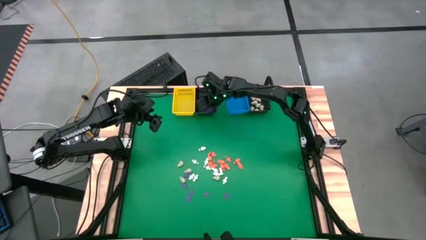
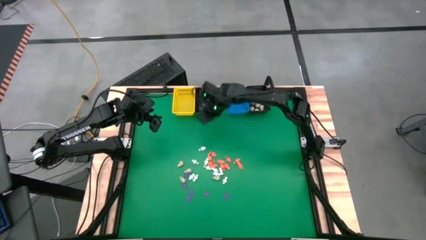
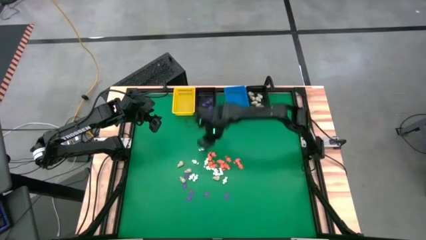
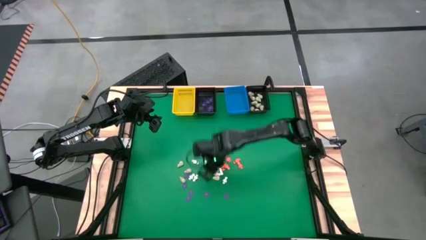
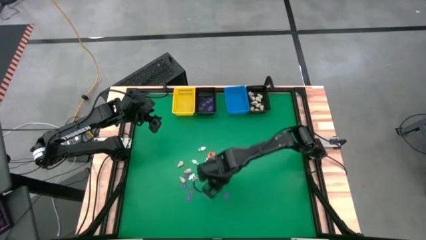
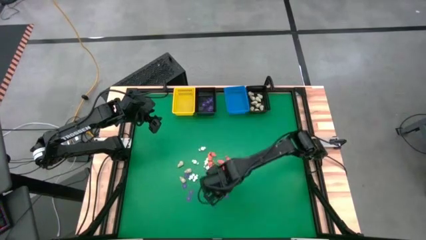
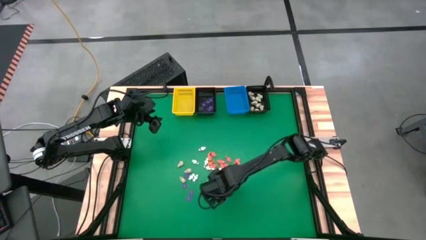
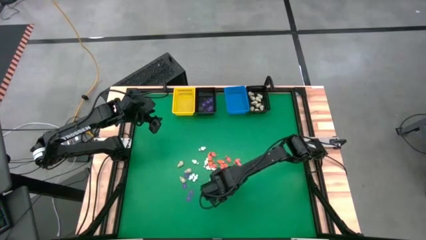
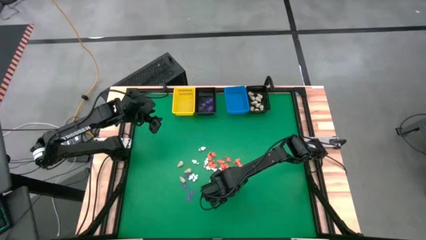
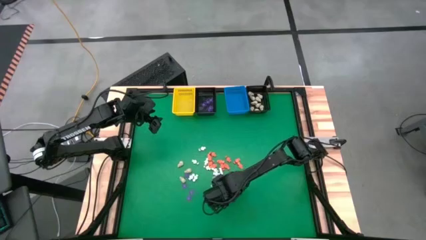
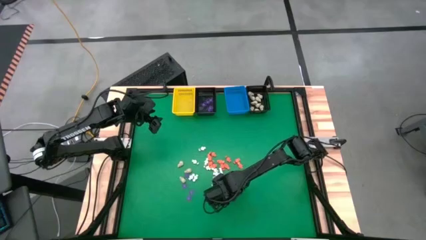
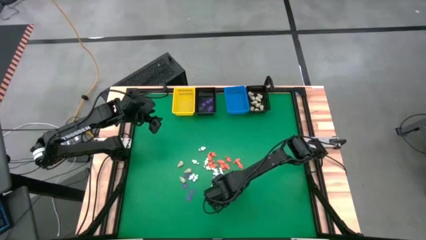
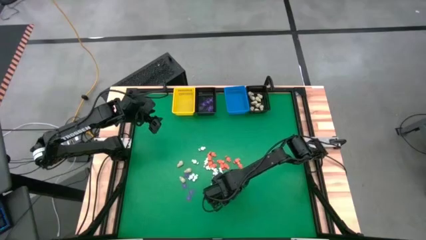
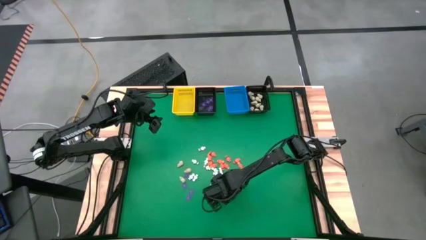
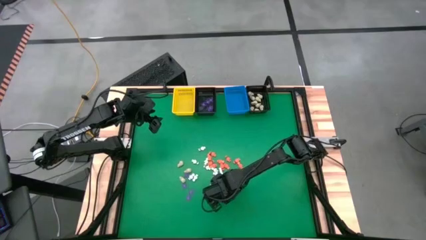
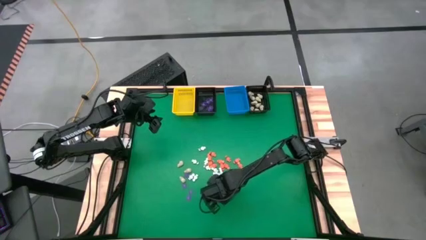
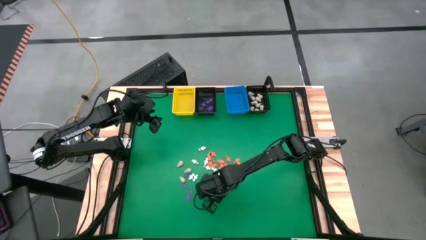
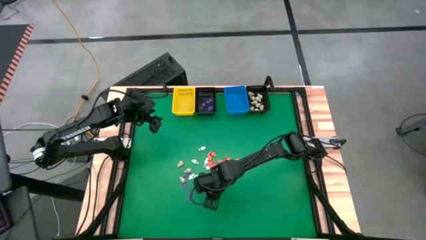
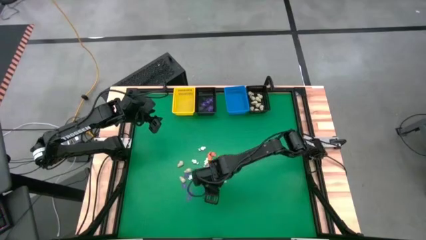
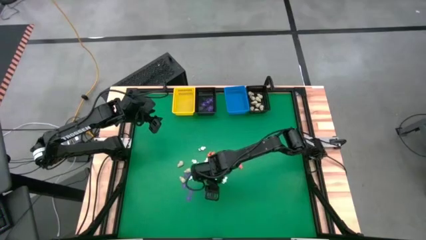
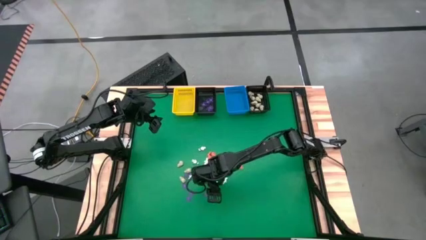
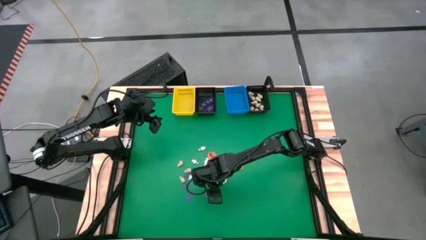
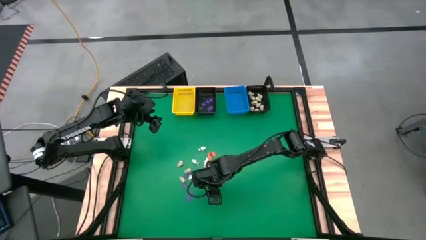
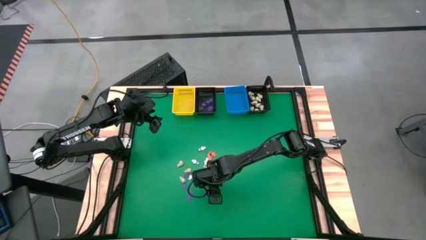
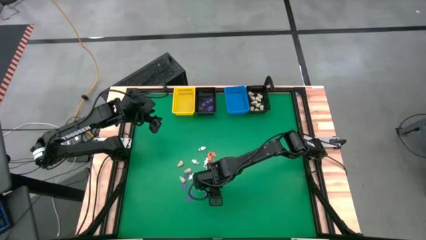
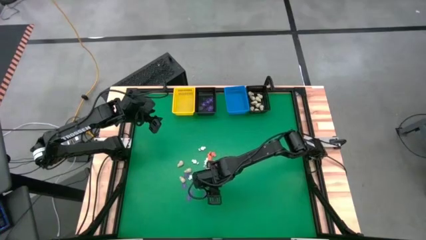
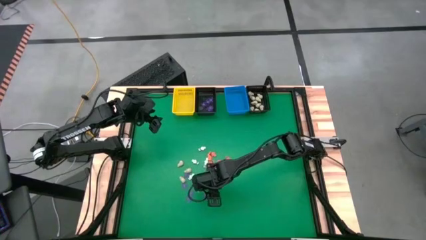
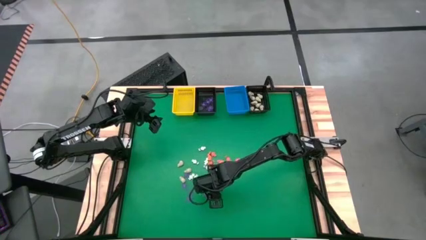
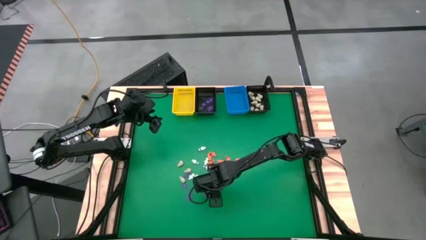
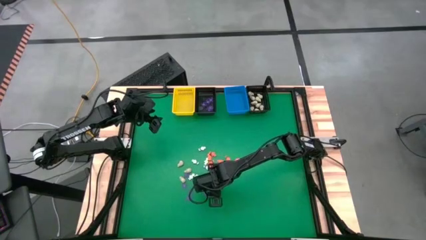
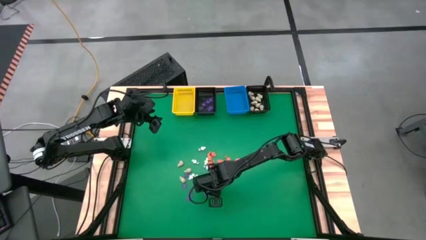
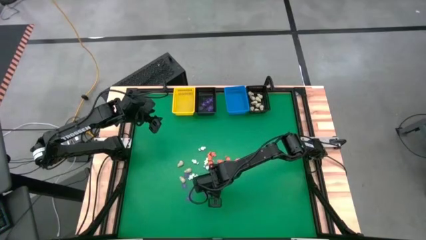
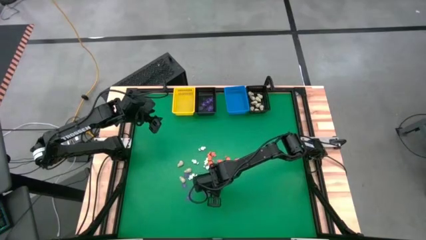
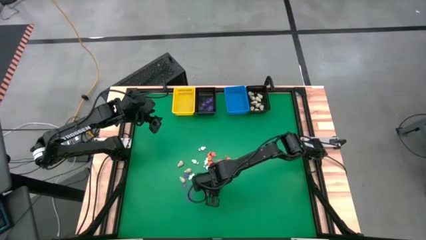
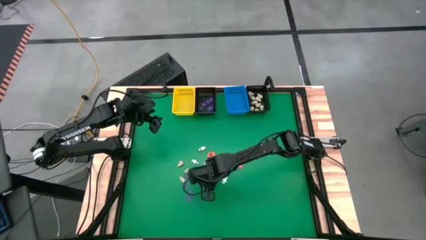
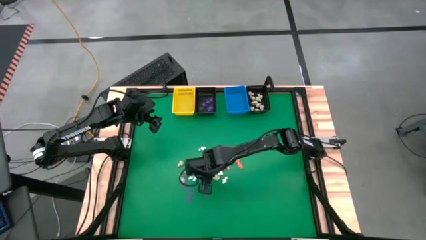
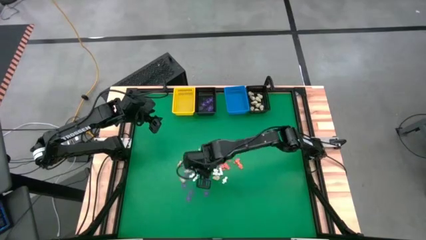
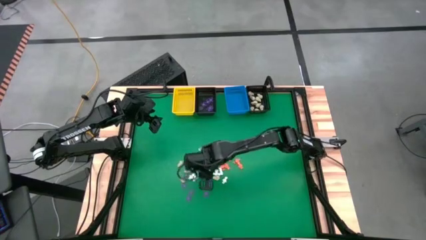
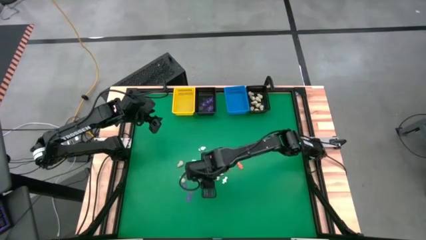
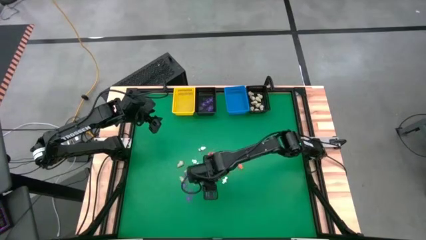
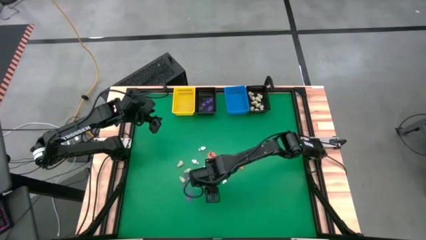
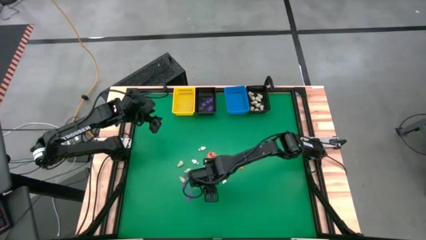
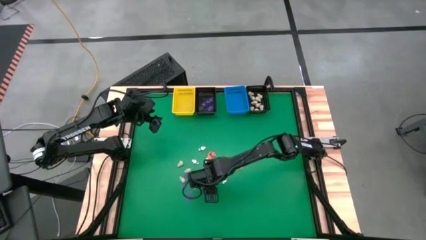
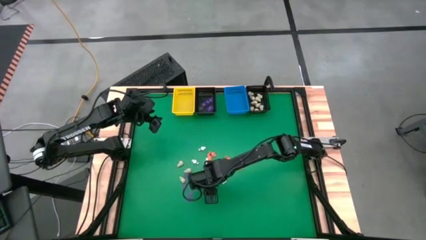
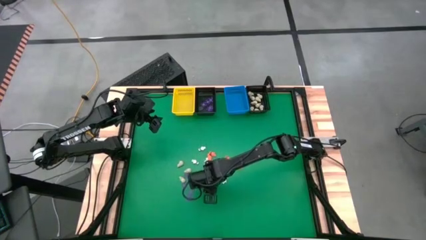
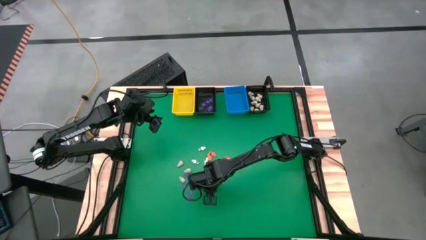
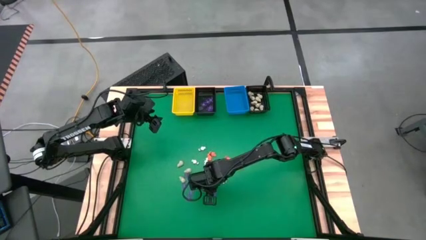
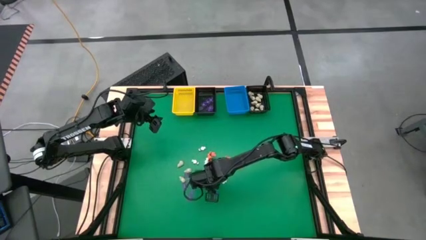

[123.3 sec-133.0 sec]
Task: Sort Halloween decoration
Put the purple spider toy into the left black basket

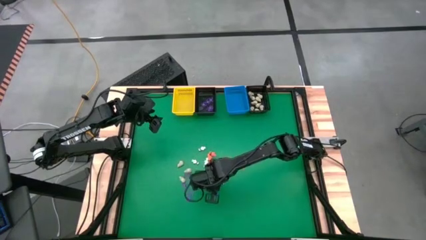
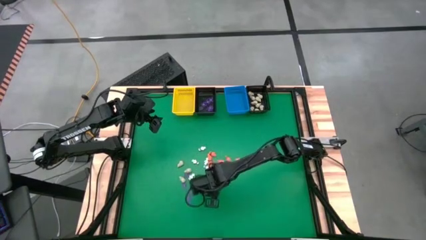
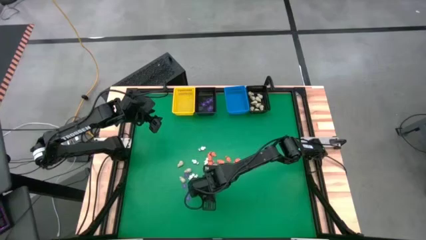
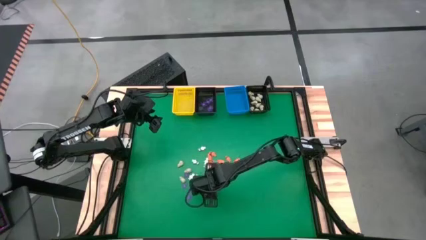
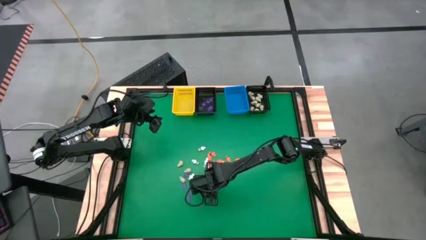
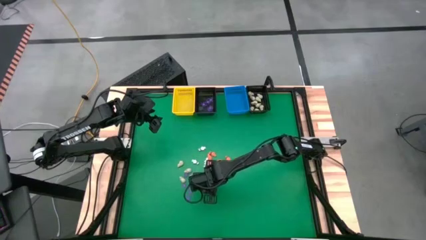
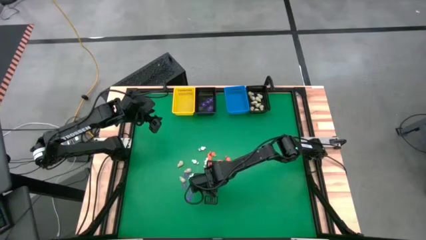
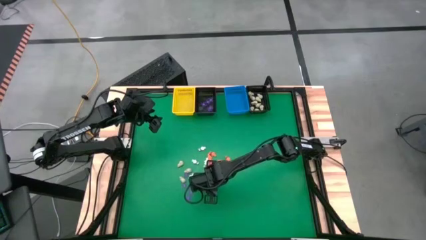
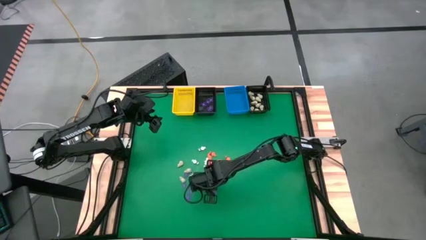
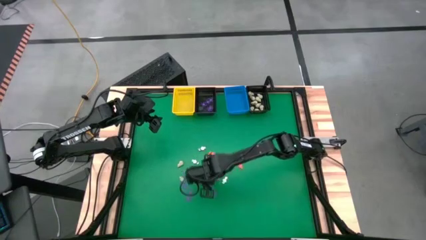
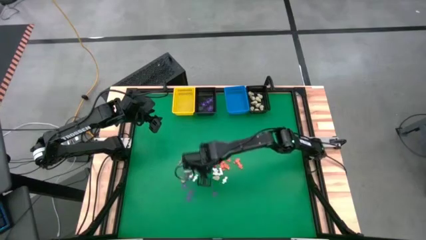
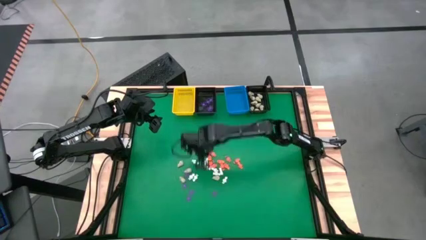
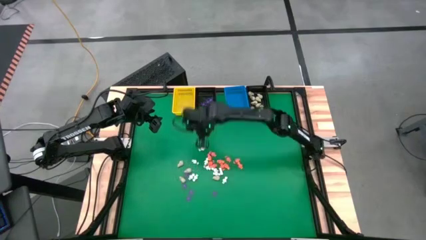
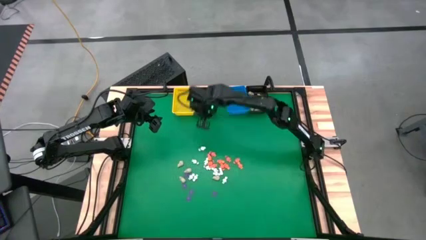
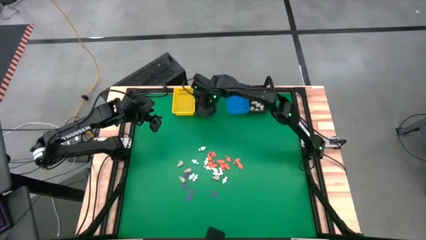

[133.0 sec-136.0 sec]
Put the purple spider toy into the left black basket

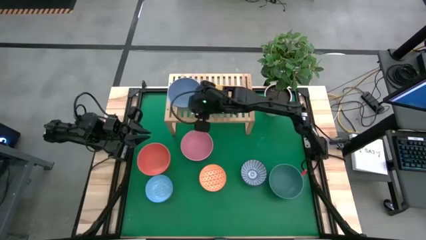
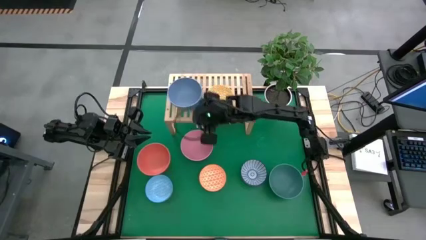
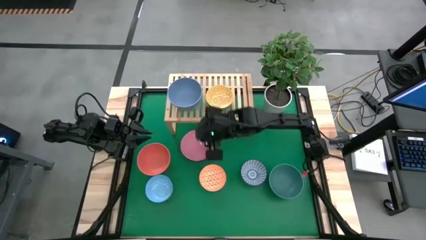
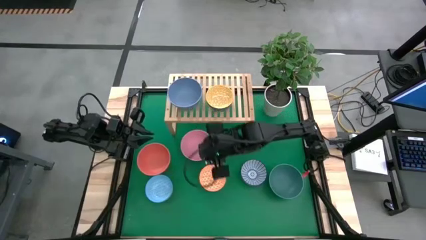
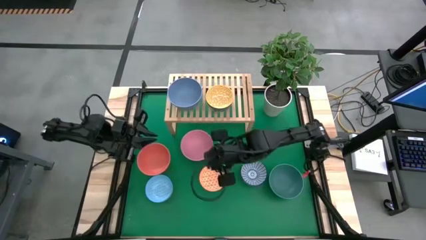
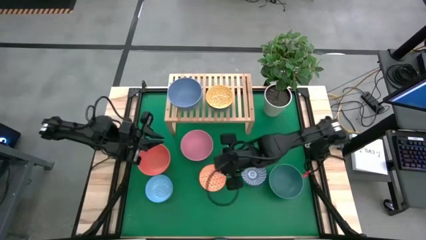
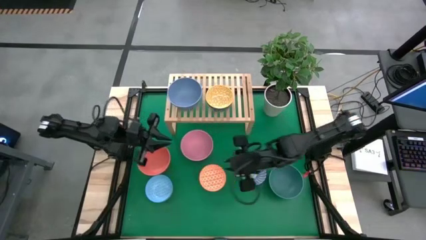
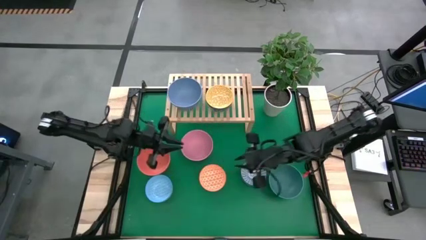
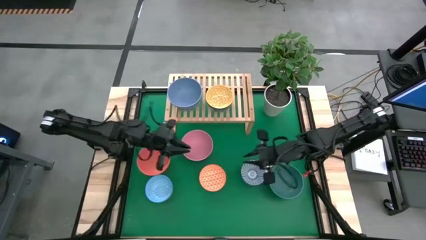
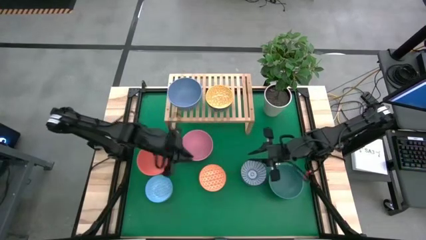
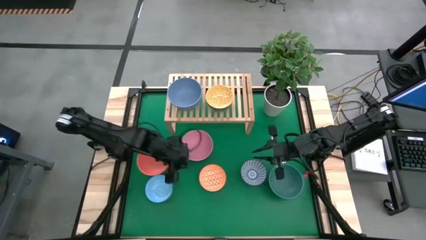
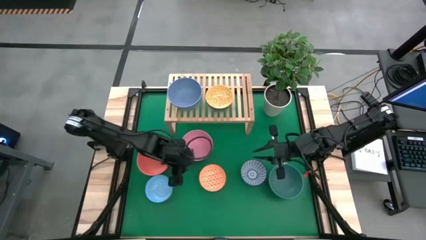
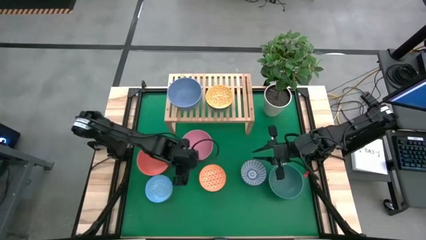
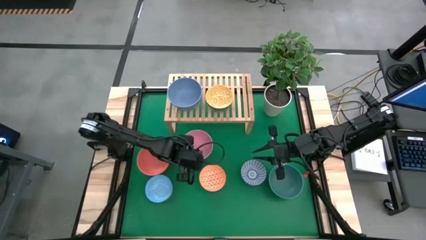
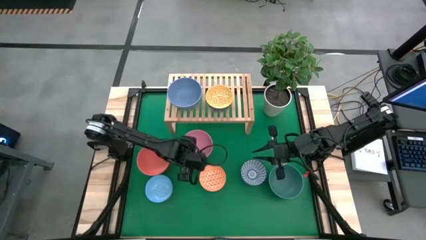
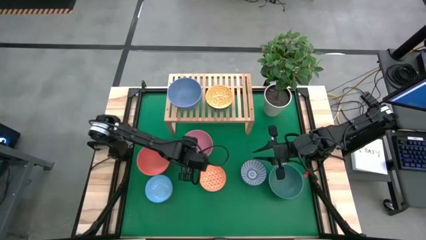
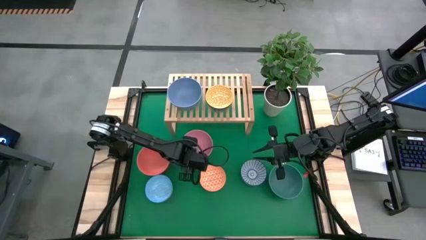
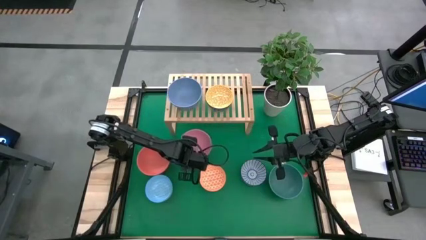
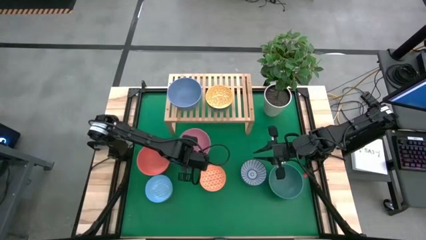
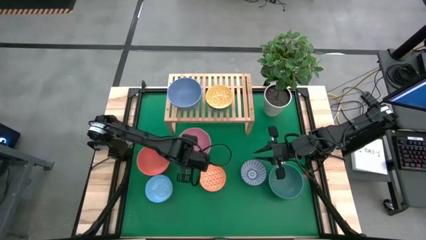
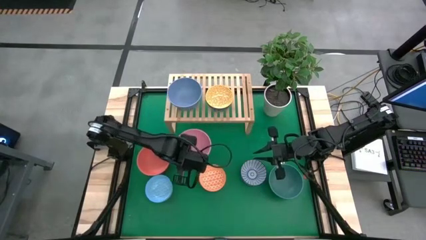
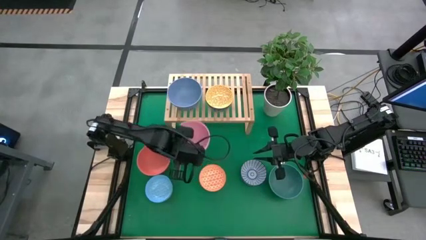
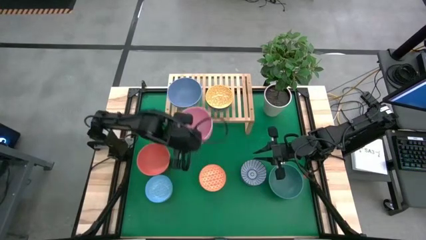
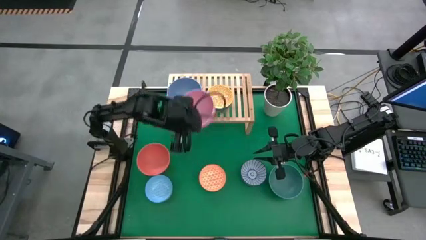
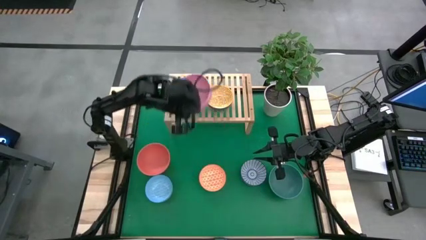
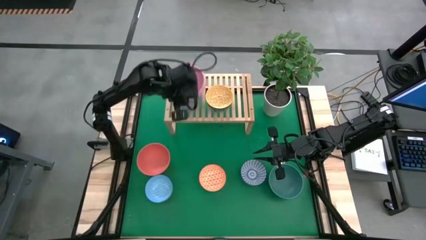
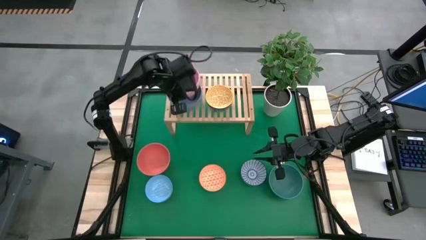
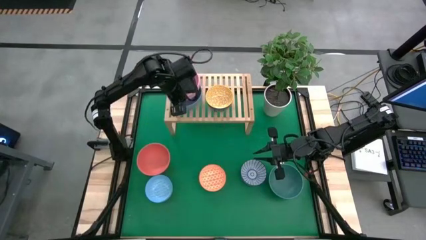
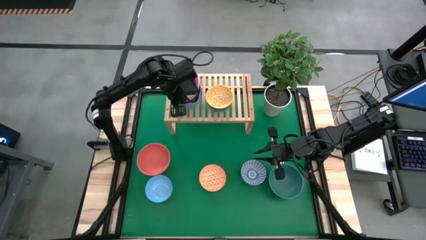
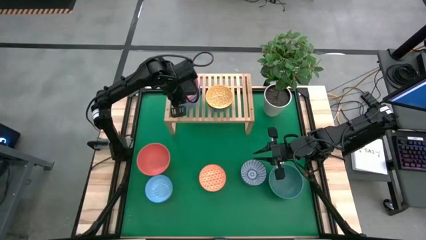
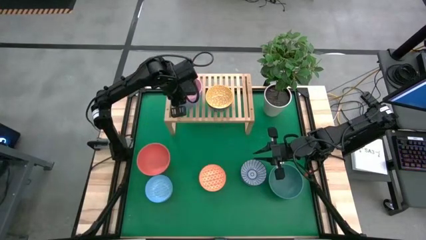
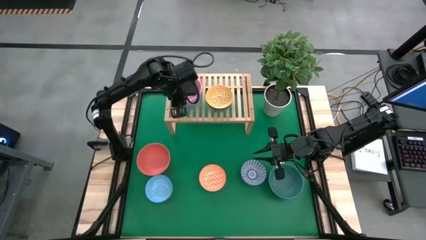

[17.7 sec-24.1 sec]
Task: Place and stack bowls onto a shelf
Stack the pink bowl on top of the blue bowl on the shelf
